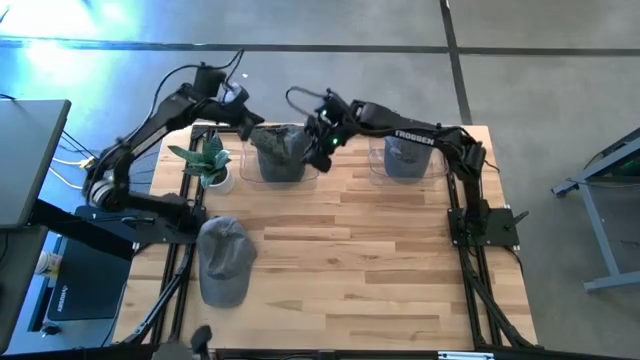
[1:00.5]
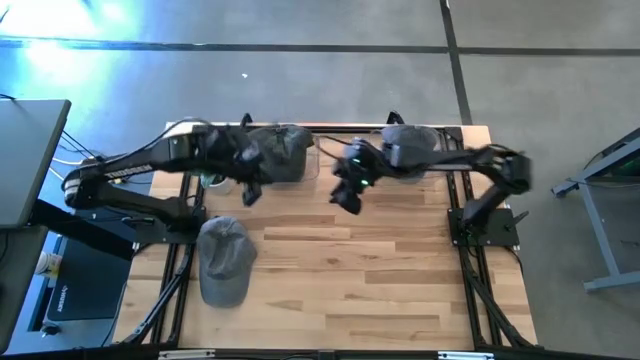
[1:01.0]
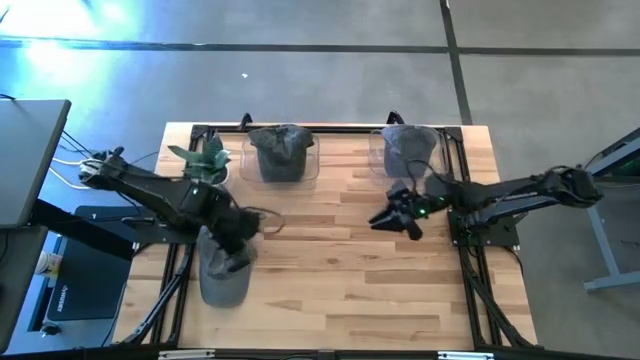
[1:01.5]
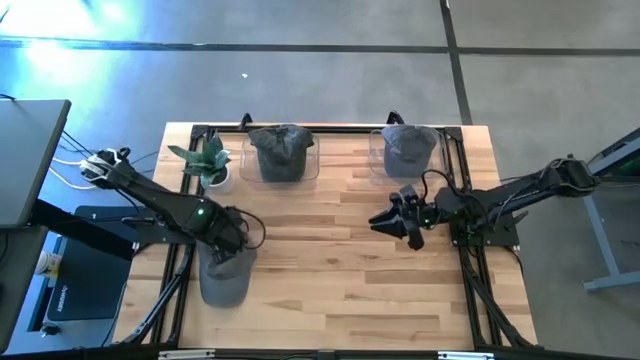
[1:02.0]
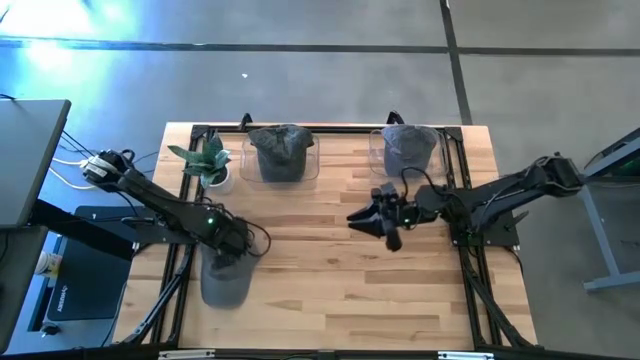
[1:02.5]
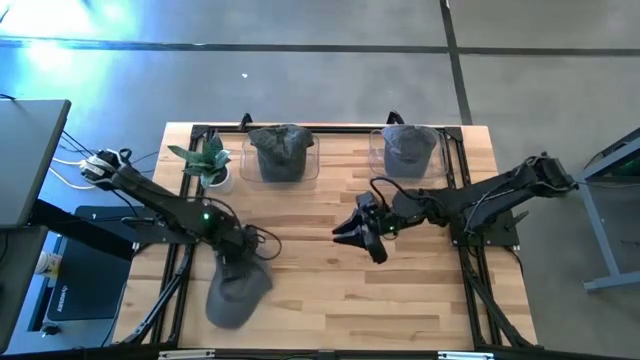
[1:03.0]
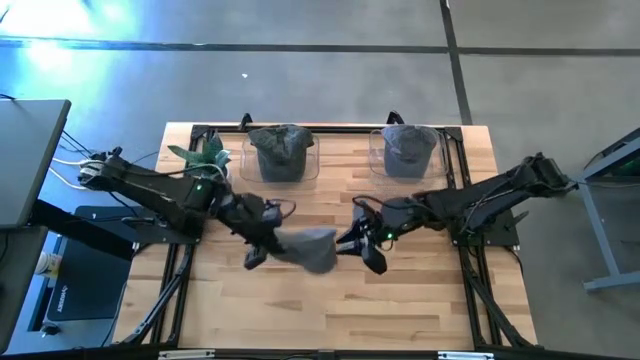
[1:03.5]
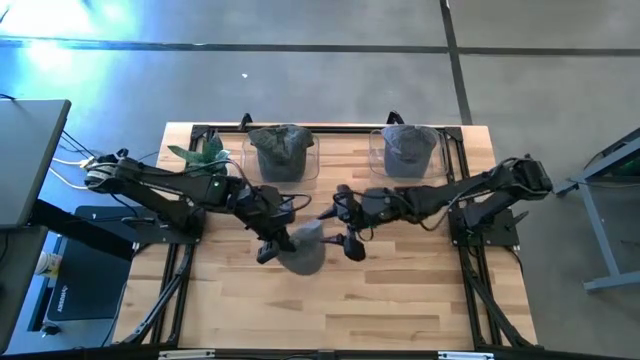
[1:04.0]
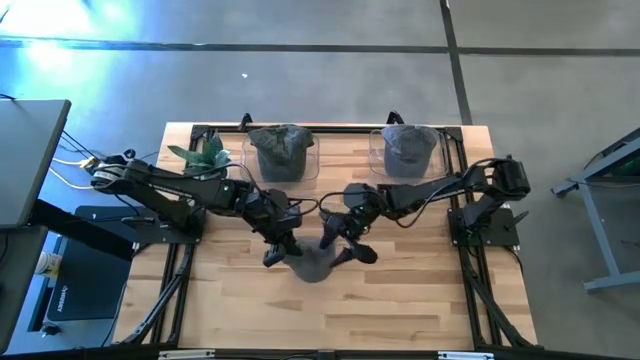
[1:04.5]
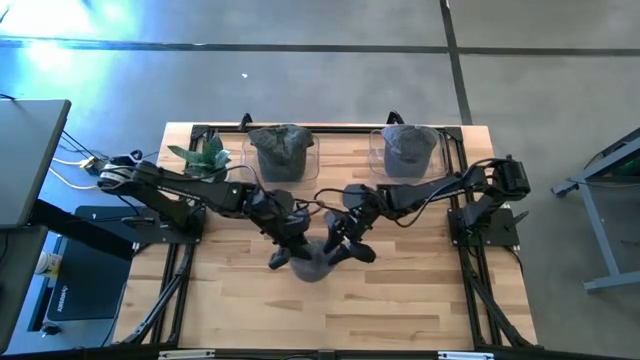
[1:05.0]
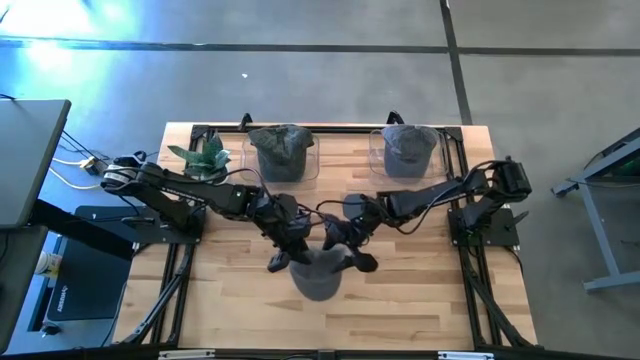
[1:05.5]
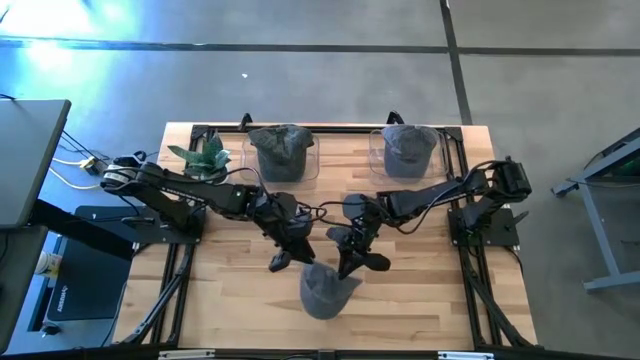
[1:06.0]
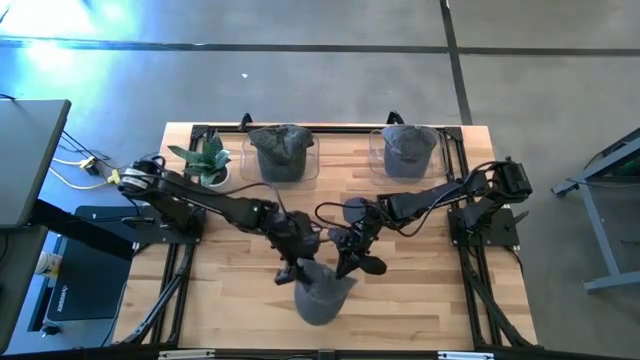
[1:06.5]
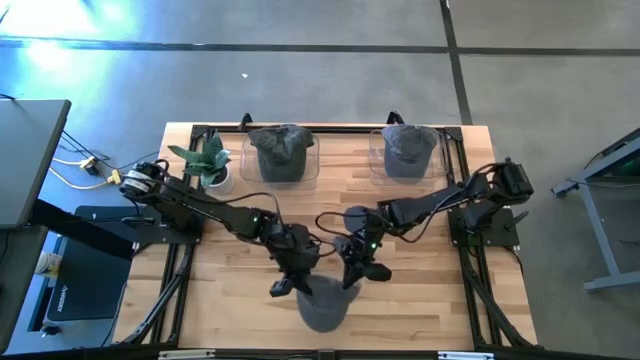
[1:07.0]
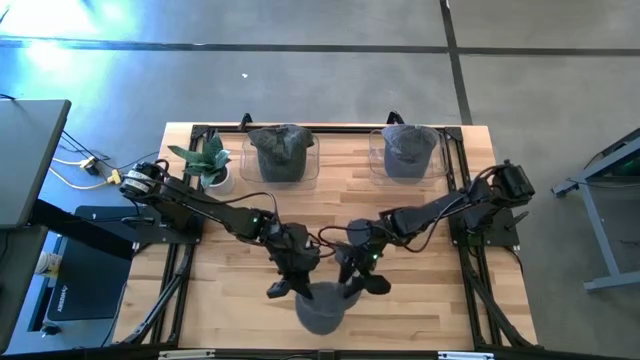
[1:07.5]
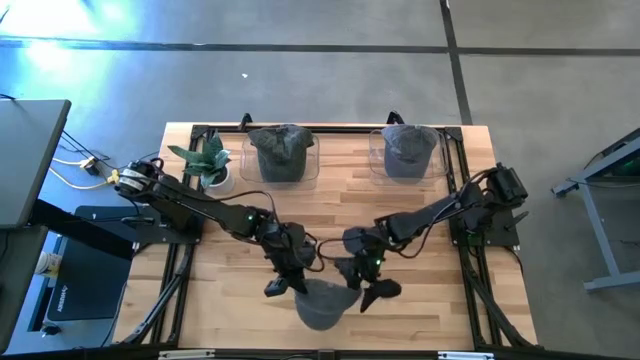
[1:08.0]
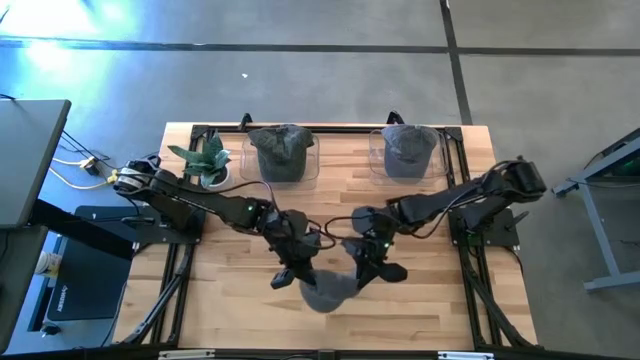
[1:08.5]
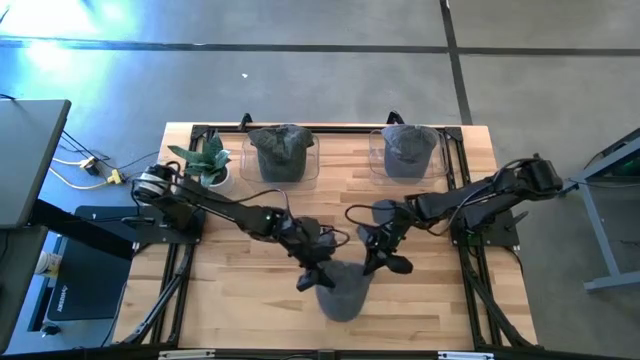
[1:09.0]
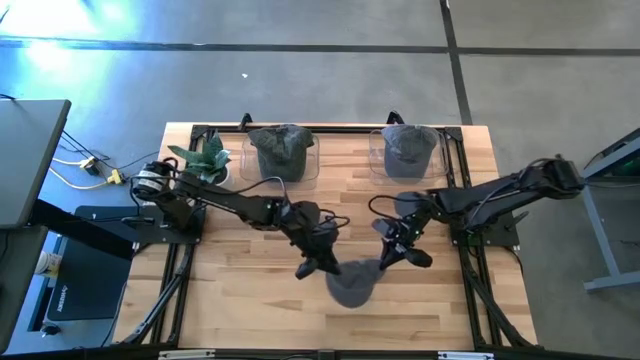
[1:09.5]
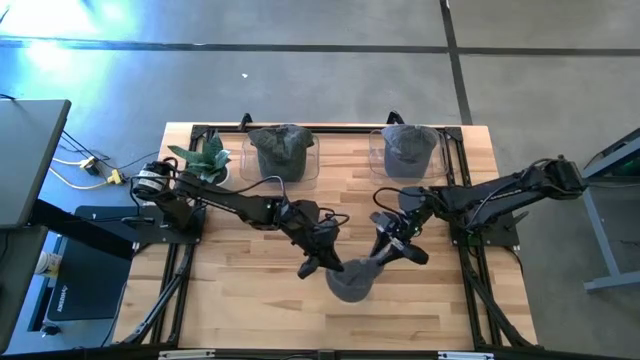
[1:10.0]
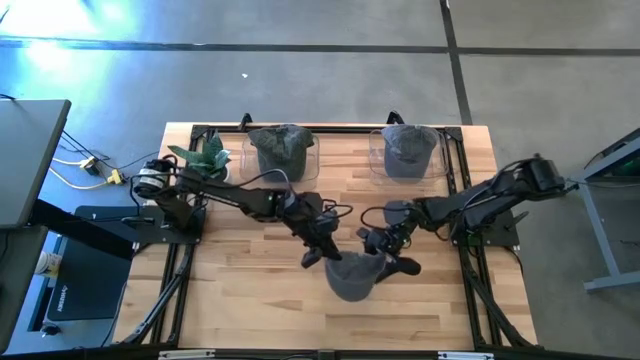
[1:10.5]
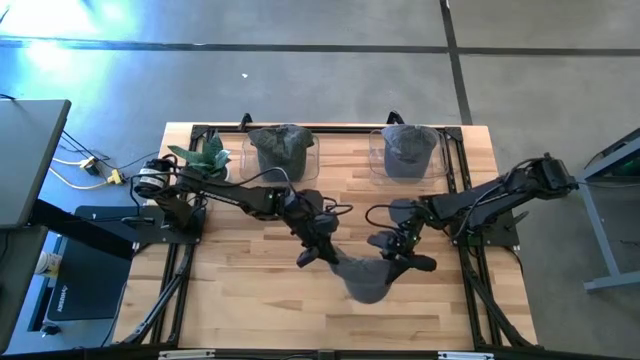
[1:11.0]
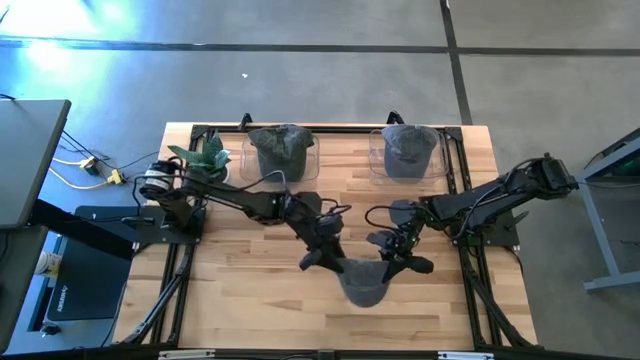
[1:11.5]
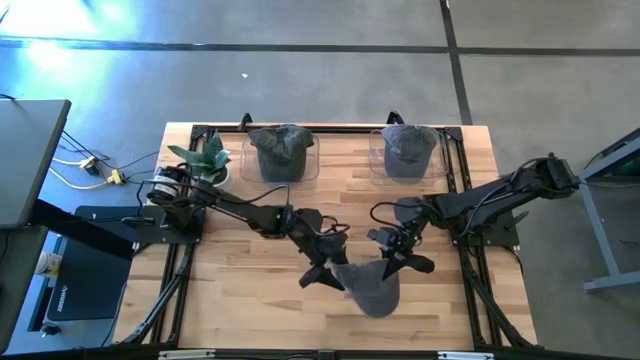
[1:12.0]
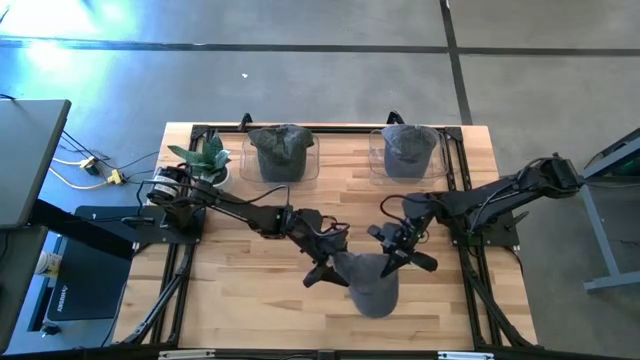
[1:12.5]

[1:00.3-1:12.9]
Task: Pick & Place hat
Put the gray cap into the right transparent bin
